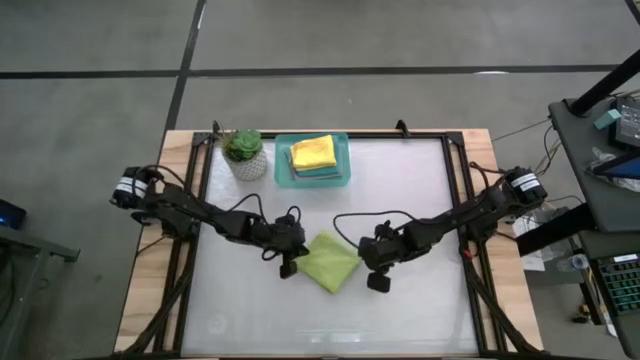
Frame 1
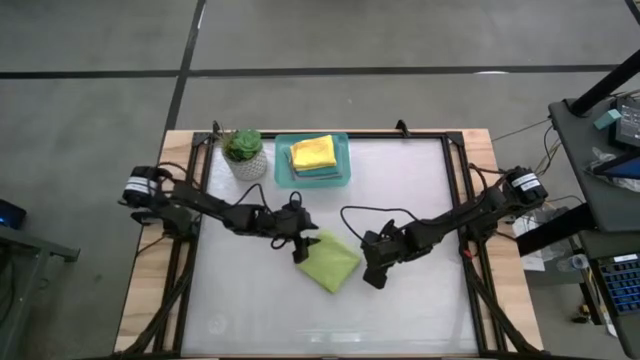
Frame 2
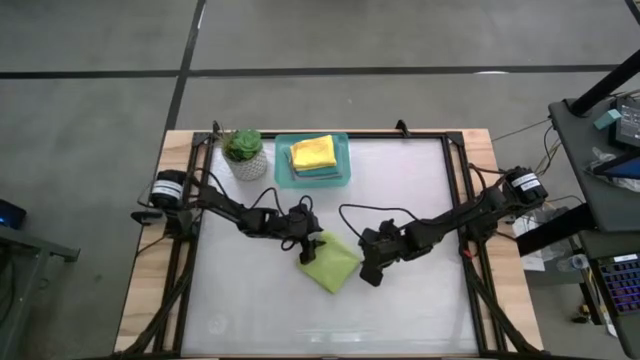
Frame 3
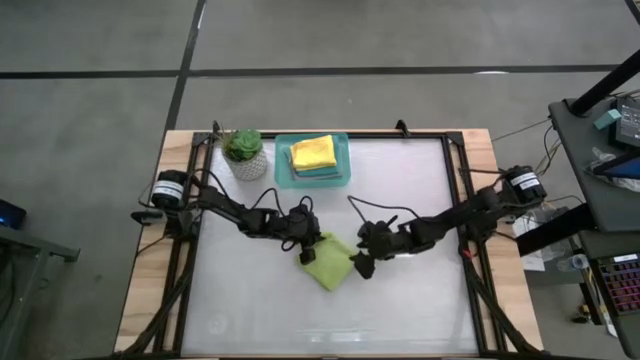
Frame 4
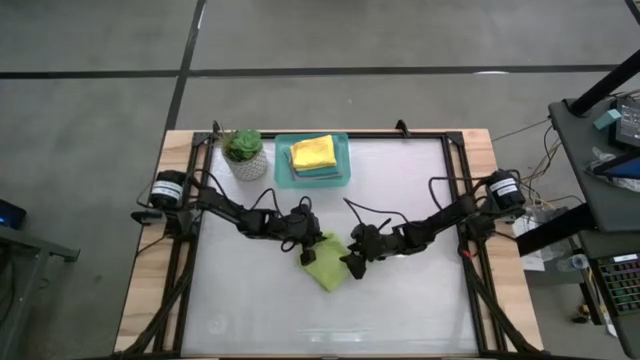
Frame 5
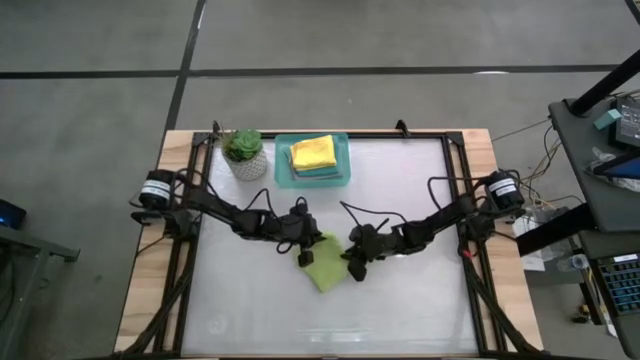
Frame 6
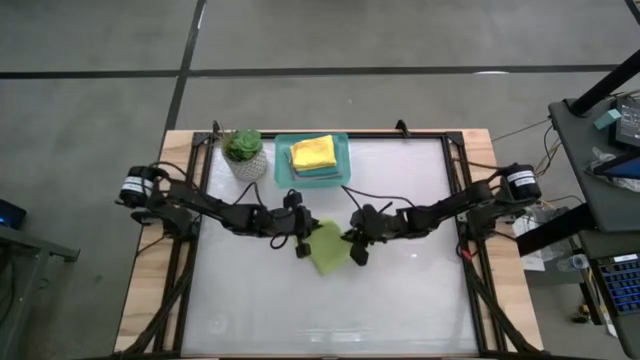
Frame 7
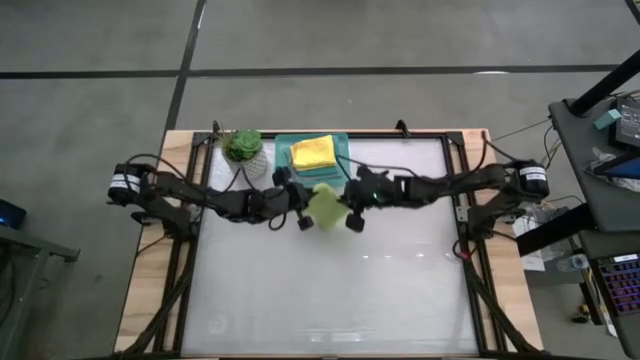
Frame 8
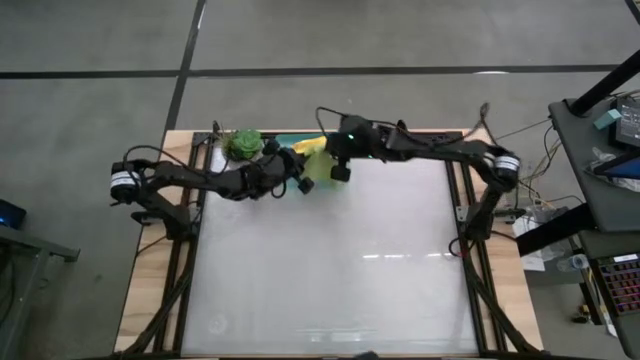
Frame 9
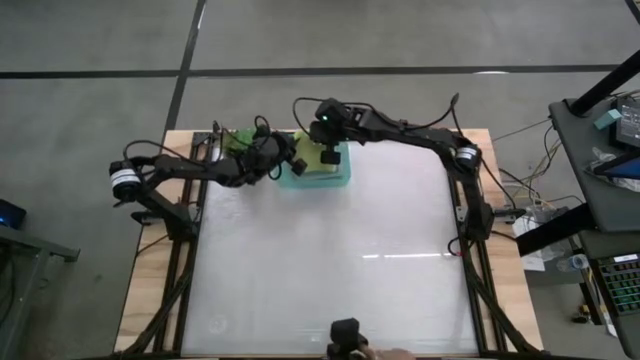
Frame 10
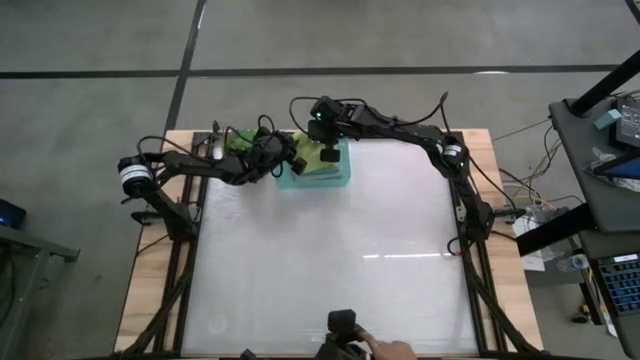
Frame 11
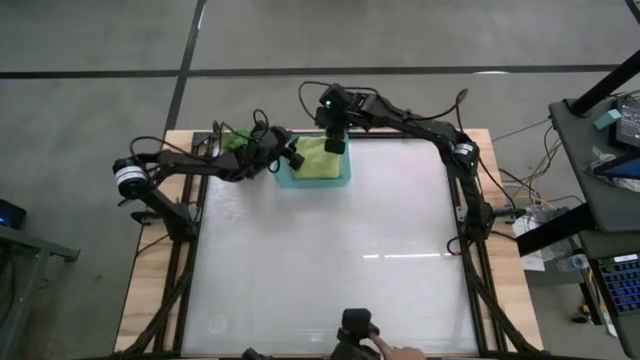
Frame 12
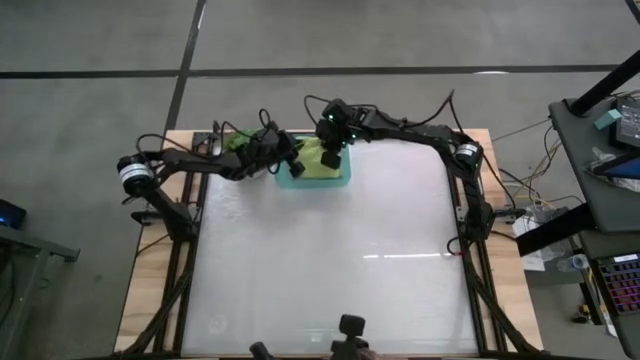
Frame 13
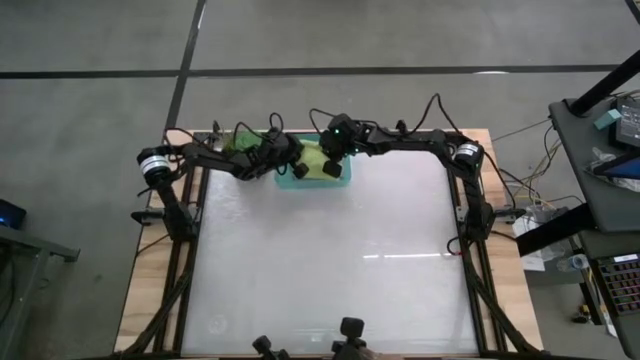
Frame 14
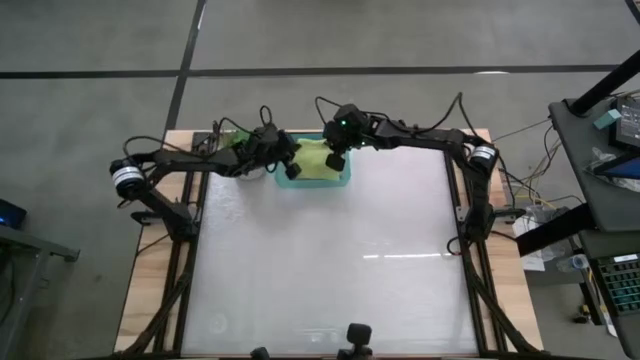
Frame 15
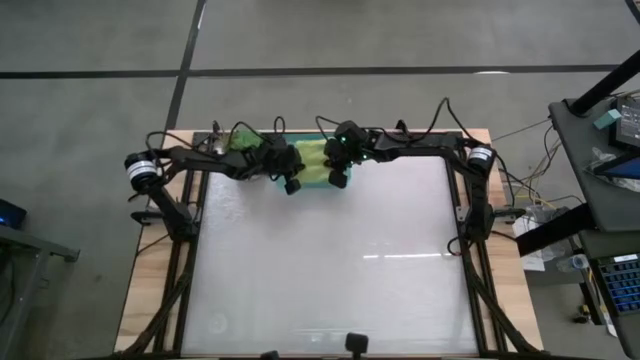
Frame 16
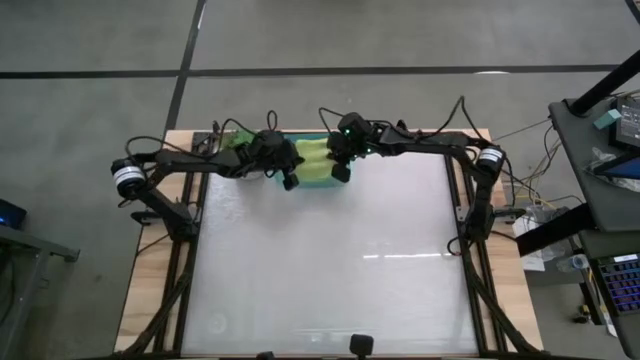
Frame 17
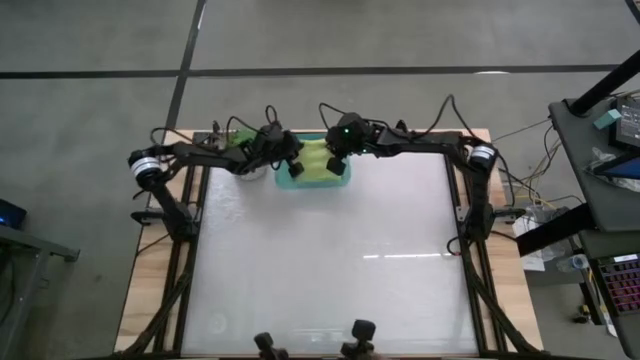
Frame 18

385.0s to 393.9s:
Task: Fold microfiber towels
Put the green microfiber cloth into the green bin

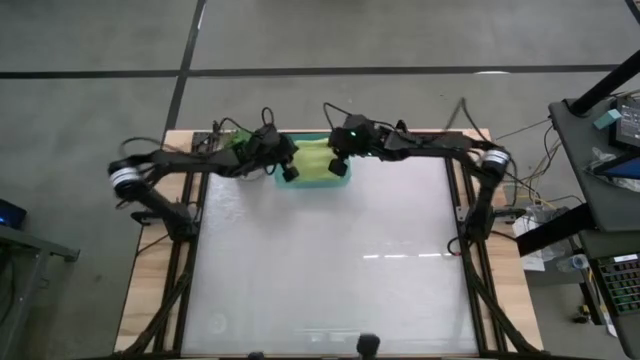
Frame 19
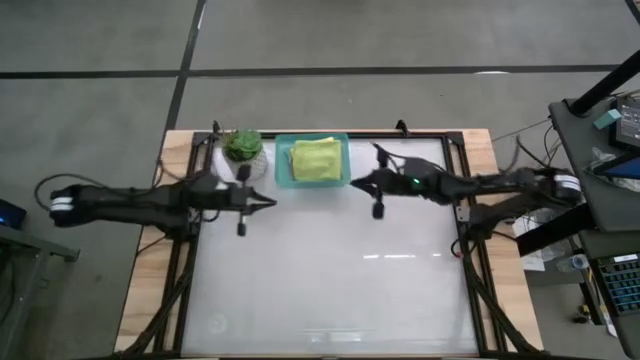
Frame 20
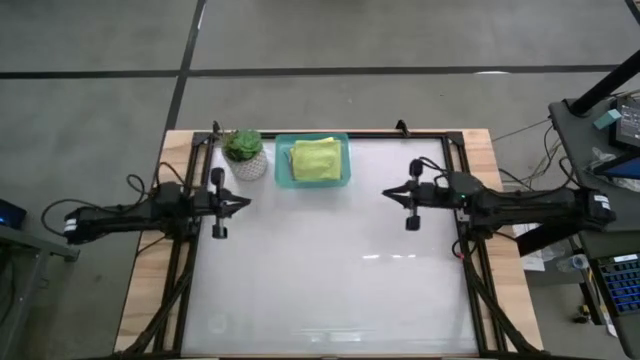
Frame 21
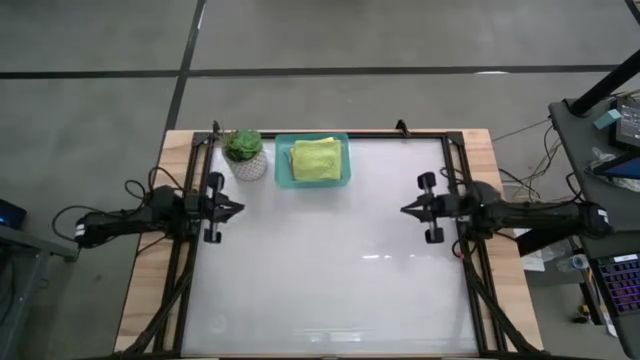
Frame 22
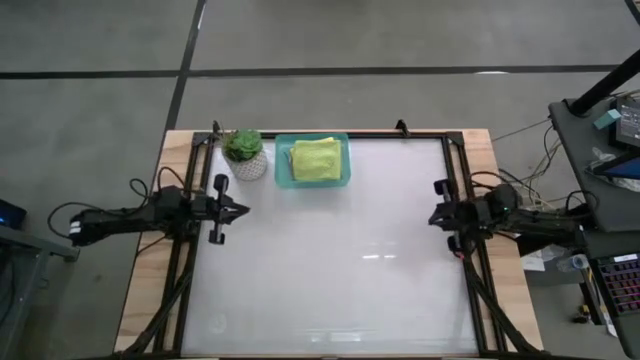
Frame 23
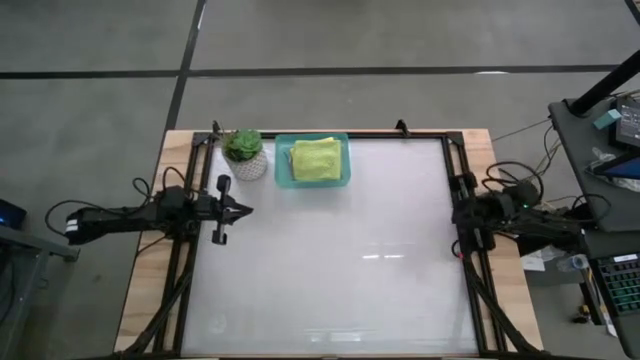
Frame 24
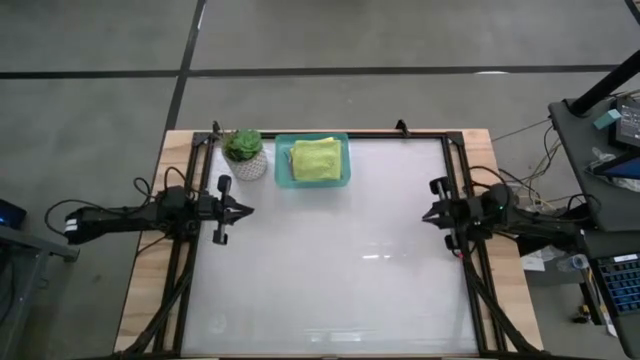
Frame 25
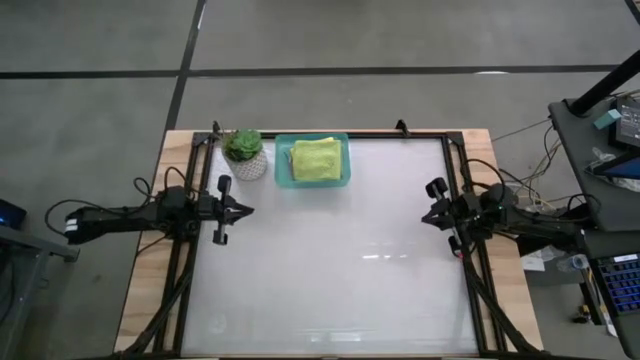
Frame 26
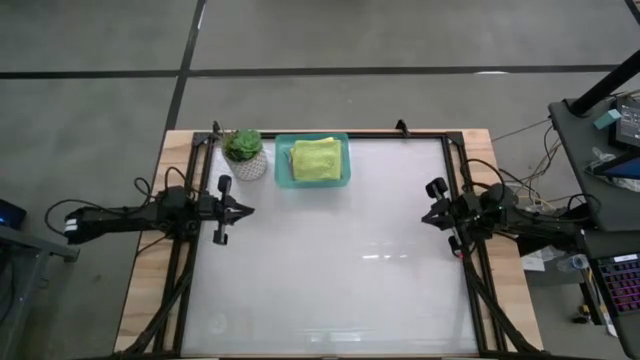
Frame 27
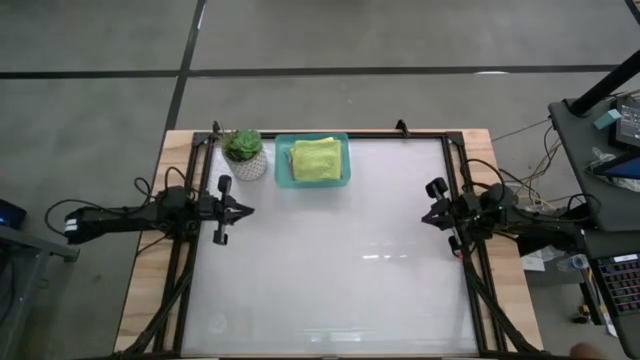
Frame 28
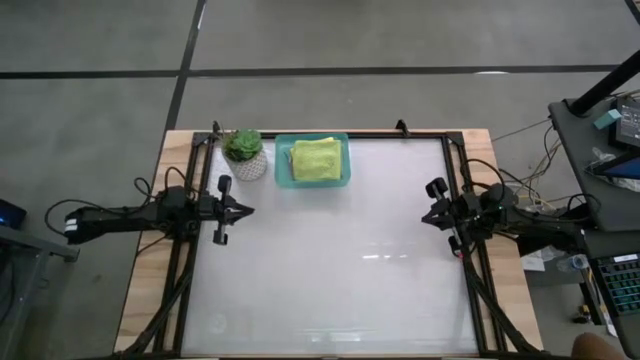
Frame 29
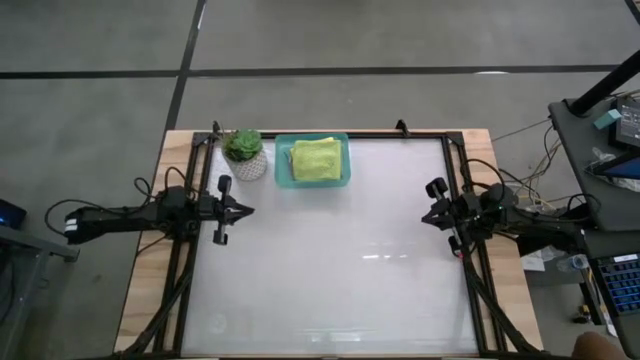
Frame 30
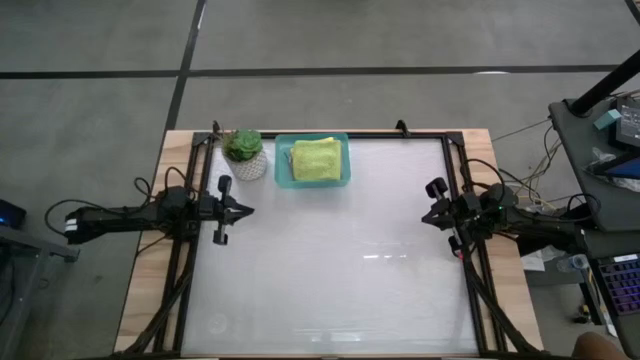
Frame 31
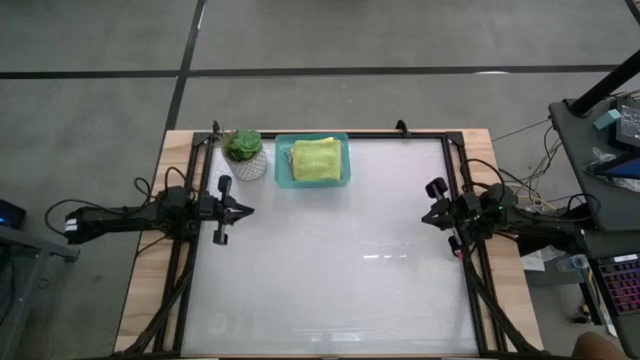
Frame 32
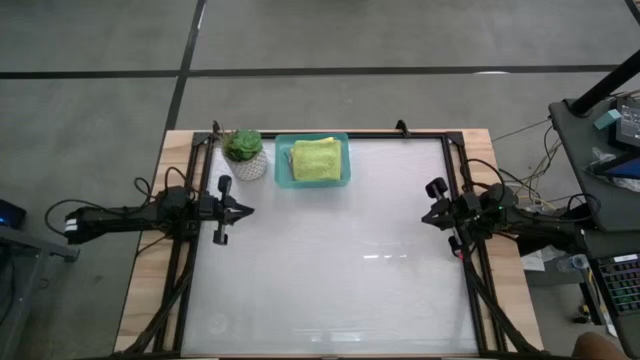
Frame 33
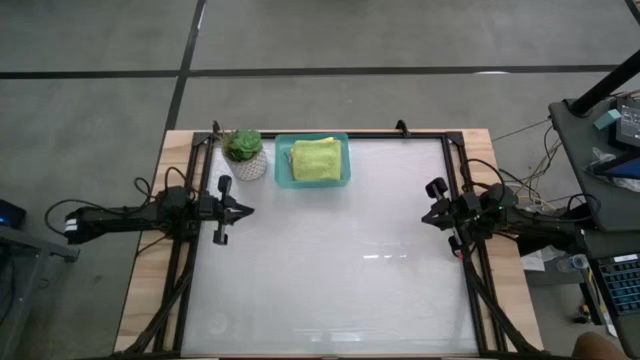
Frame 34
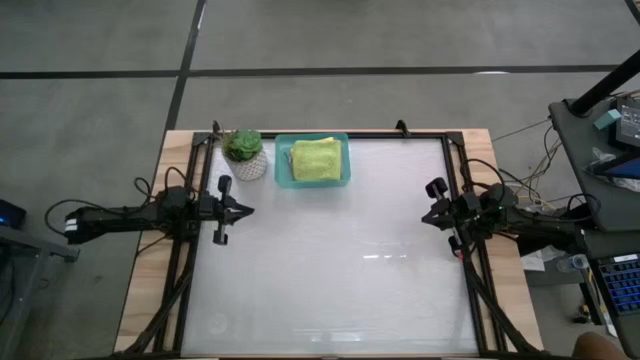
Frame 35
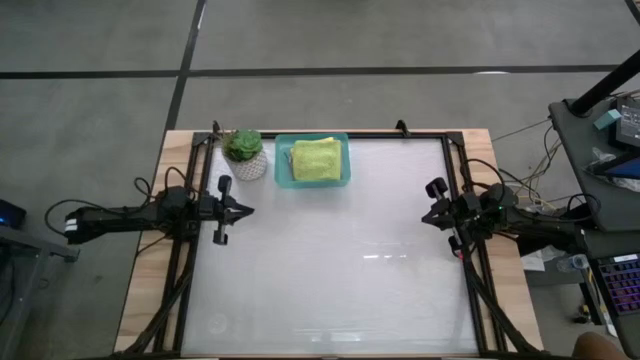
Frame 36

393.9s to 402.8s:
Return to Home Position

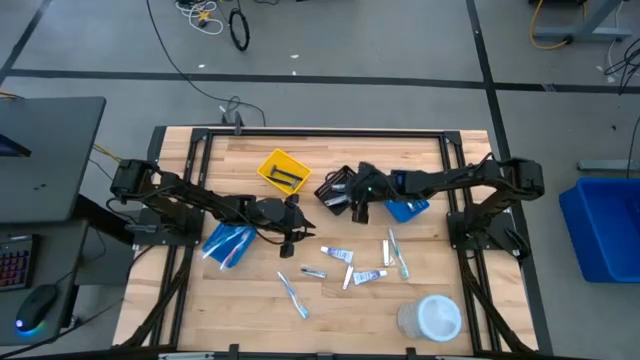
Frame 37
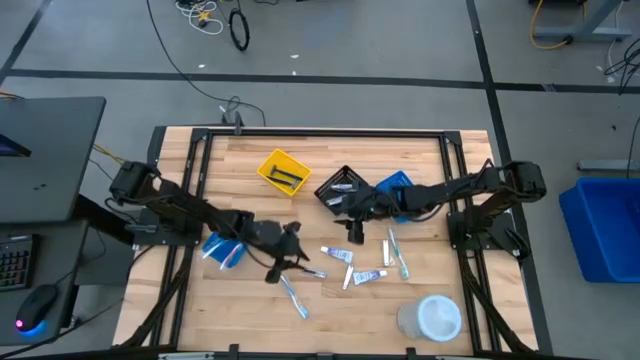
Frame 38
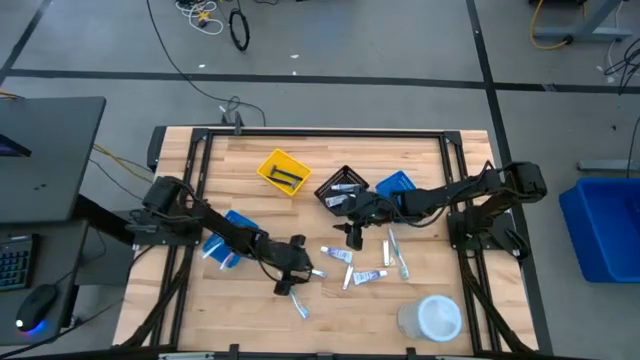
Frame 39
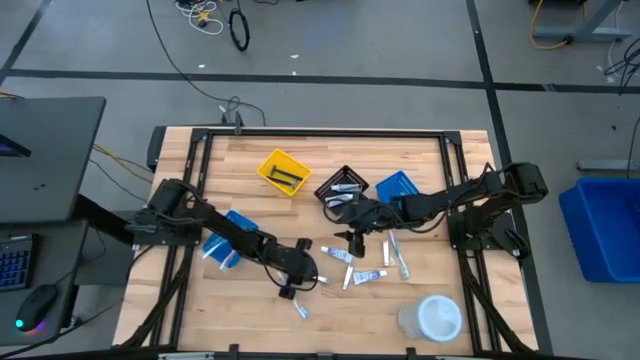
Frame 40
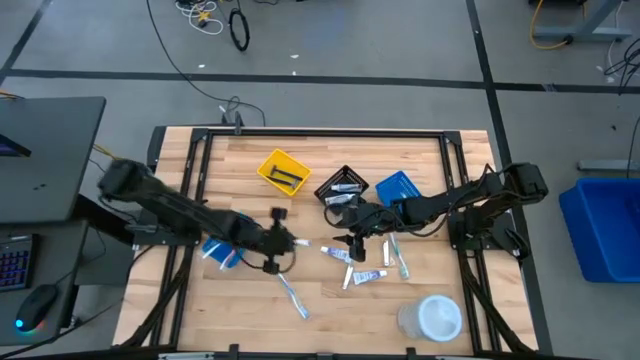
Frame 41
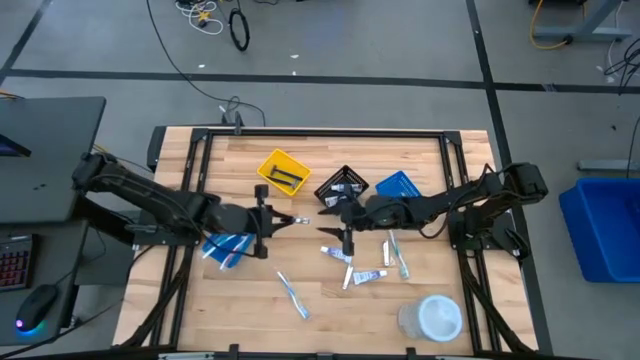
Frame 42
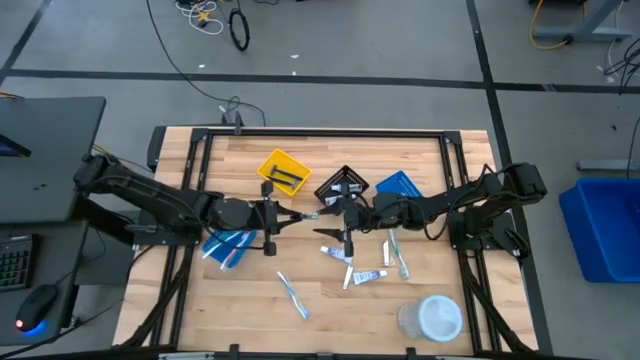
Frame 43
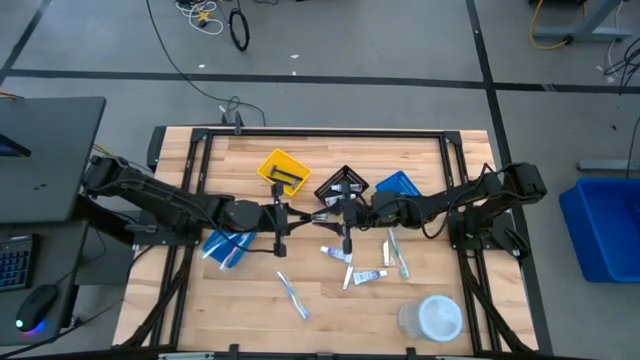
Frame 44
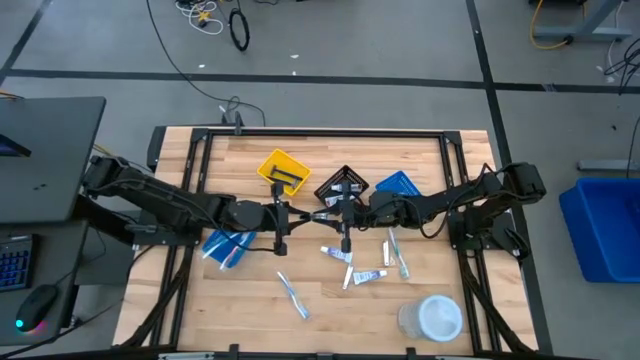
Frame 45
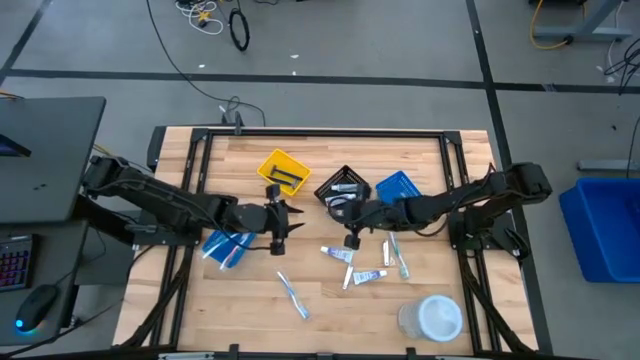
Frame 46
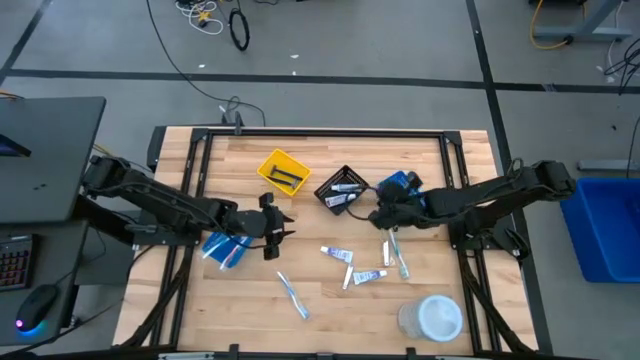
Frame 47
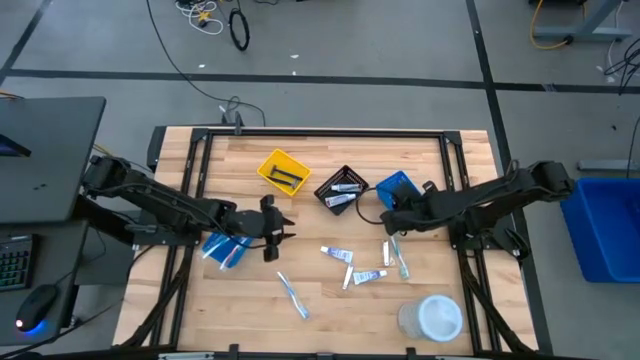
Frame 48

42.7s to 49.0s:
Task: Pick & Place Travel size toiletries
Put the silver nail cutter into the right blue bin
